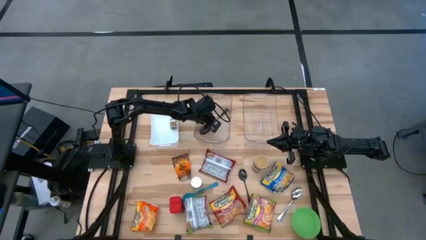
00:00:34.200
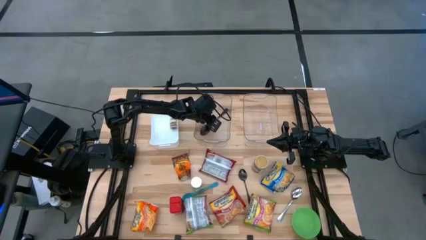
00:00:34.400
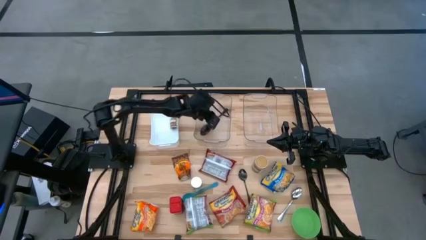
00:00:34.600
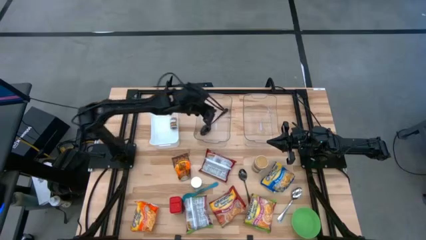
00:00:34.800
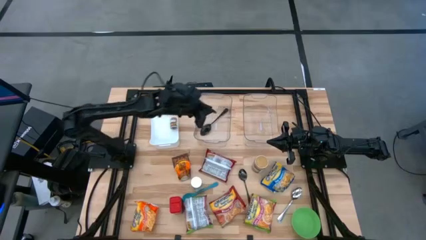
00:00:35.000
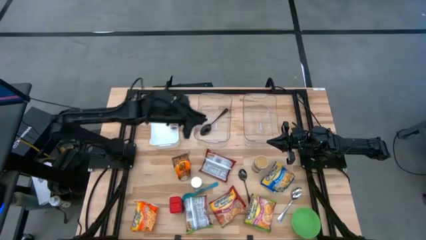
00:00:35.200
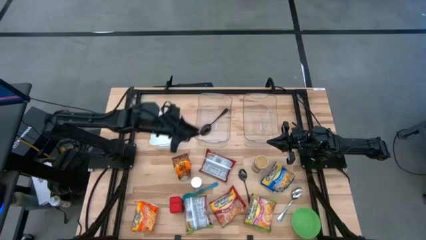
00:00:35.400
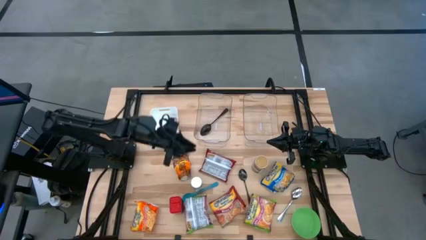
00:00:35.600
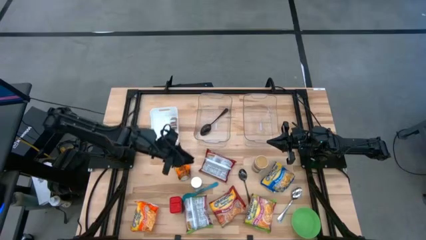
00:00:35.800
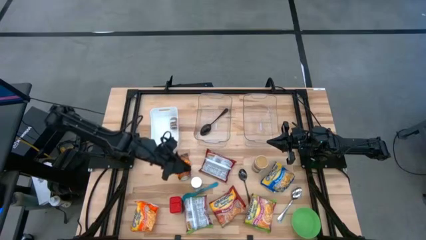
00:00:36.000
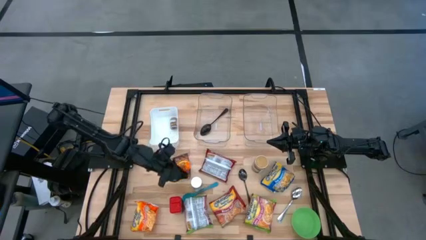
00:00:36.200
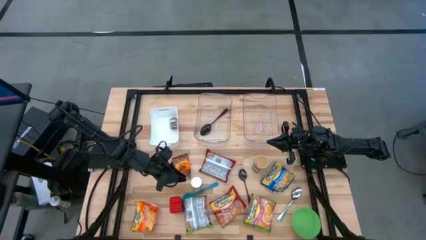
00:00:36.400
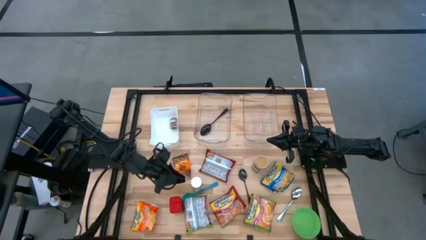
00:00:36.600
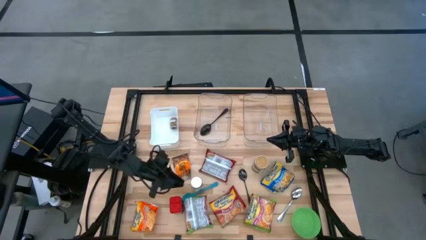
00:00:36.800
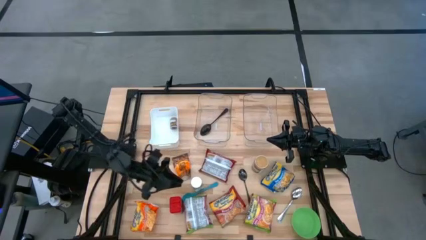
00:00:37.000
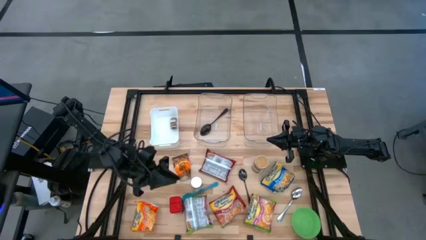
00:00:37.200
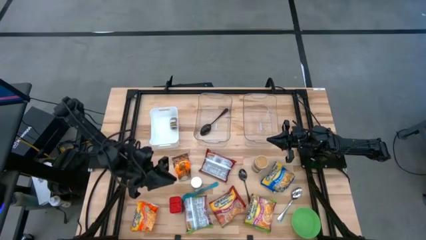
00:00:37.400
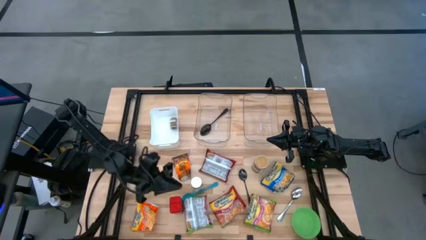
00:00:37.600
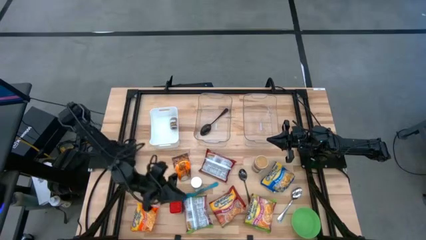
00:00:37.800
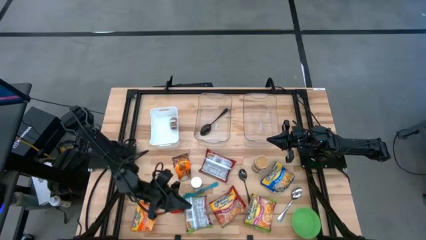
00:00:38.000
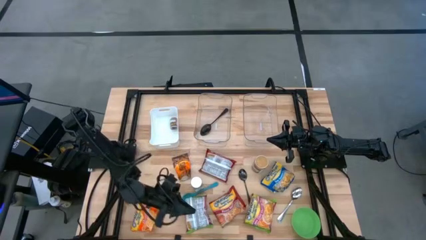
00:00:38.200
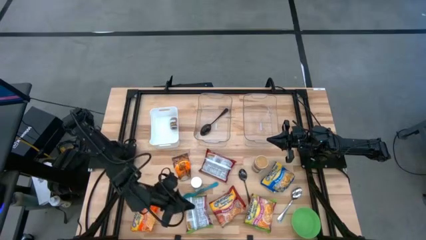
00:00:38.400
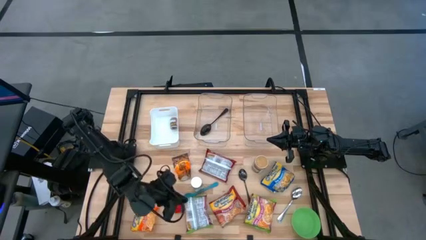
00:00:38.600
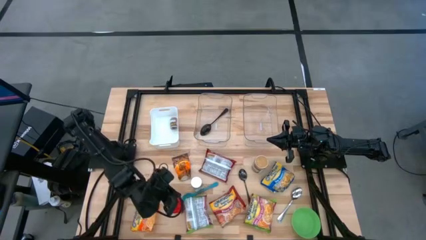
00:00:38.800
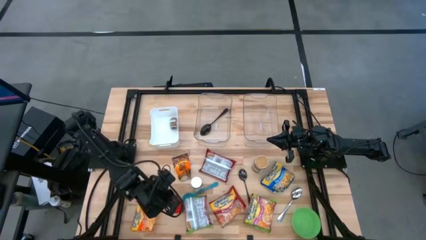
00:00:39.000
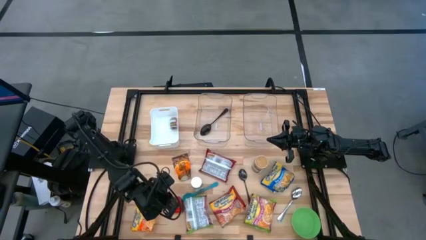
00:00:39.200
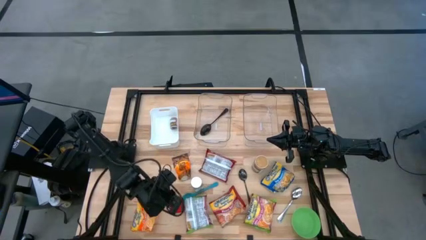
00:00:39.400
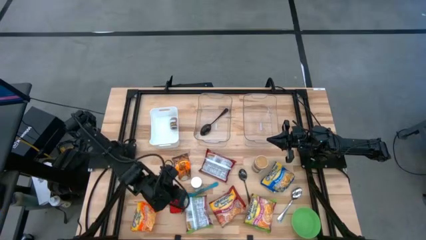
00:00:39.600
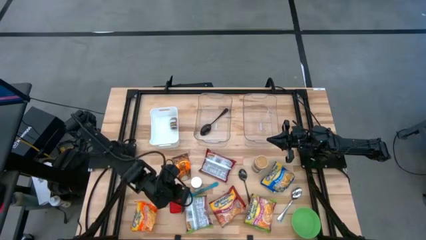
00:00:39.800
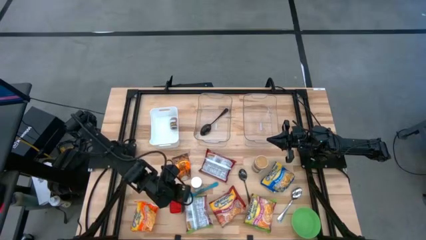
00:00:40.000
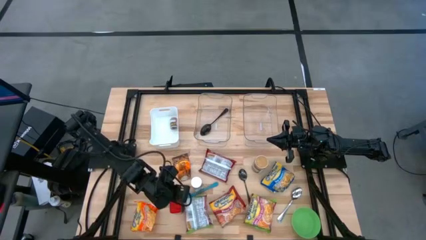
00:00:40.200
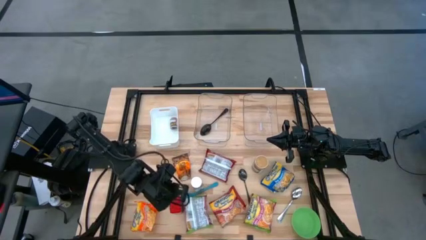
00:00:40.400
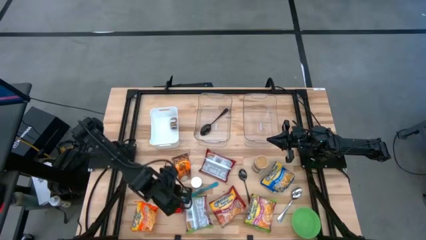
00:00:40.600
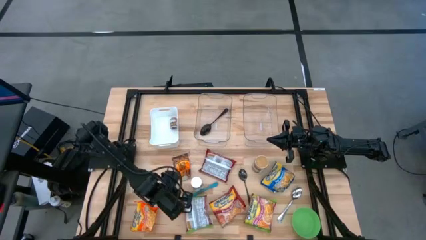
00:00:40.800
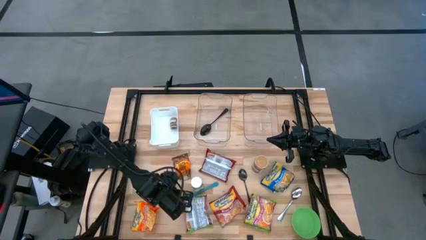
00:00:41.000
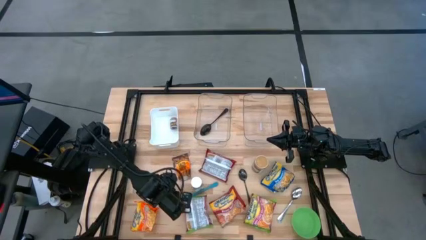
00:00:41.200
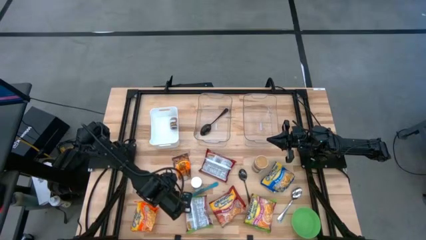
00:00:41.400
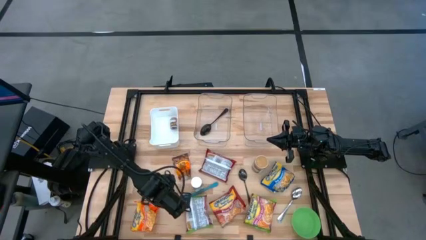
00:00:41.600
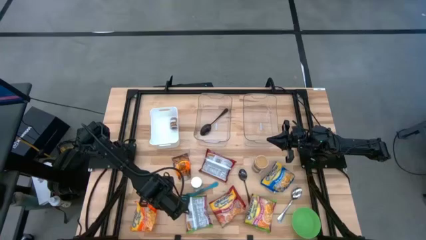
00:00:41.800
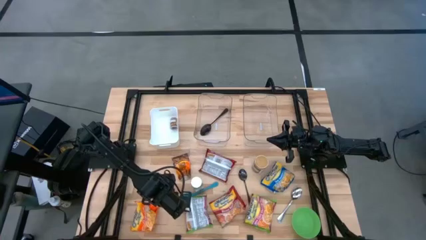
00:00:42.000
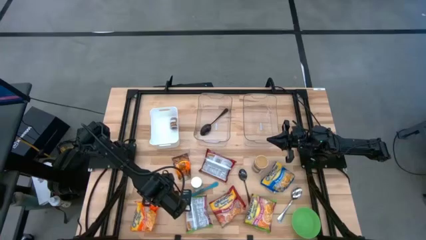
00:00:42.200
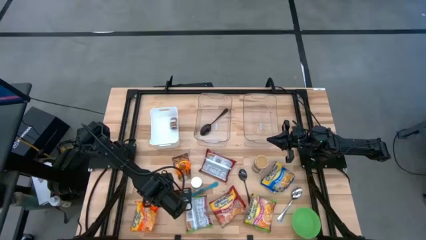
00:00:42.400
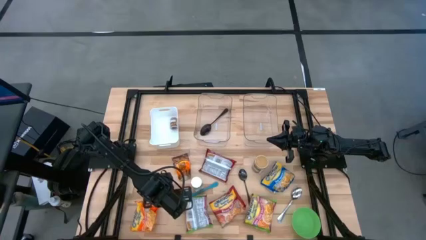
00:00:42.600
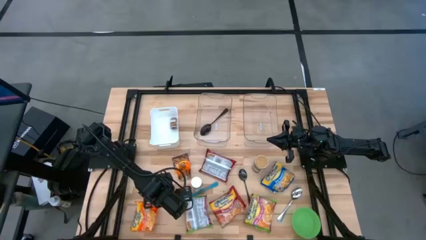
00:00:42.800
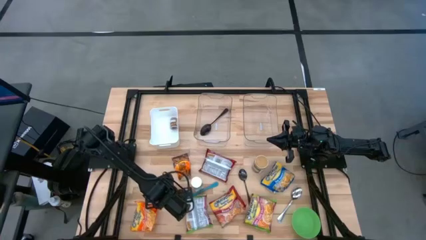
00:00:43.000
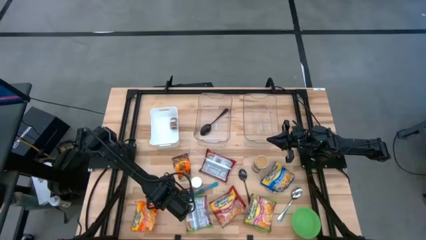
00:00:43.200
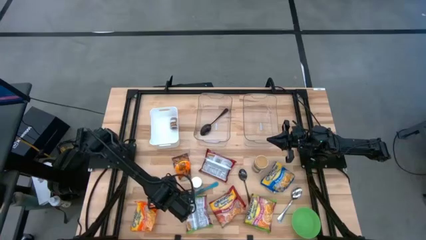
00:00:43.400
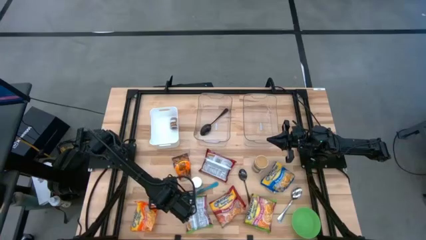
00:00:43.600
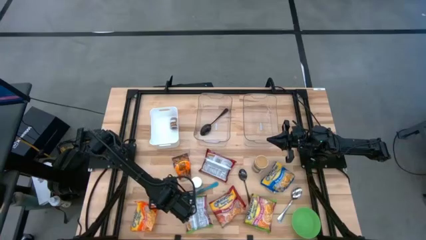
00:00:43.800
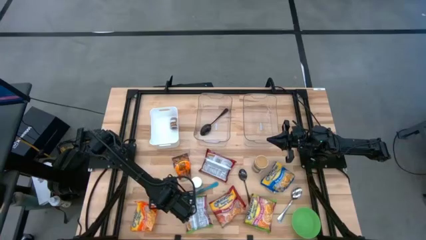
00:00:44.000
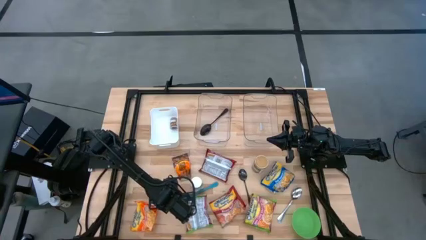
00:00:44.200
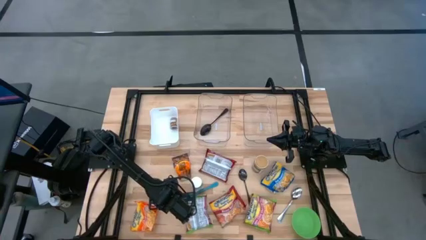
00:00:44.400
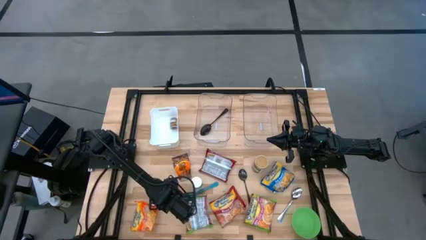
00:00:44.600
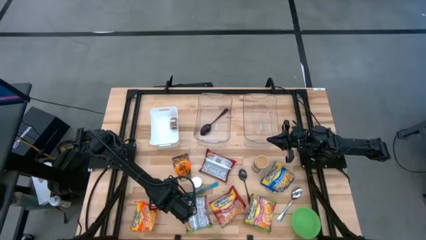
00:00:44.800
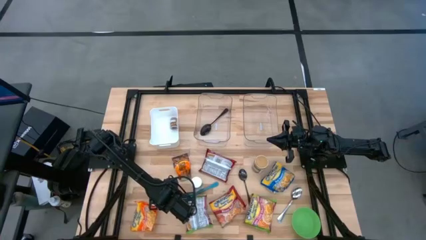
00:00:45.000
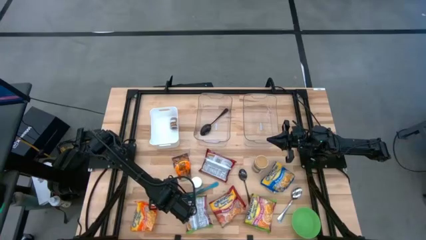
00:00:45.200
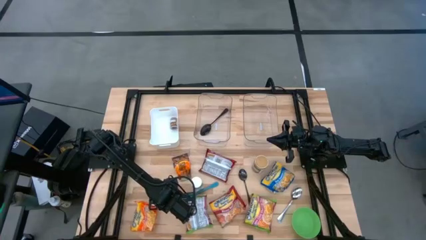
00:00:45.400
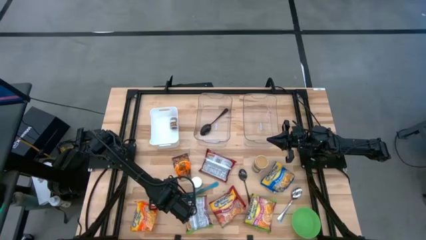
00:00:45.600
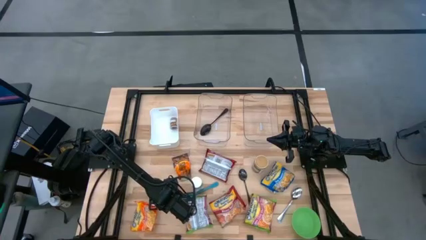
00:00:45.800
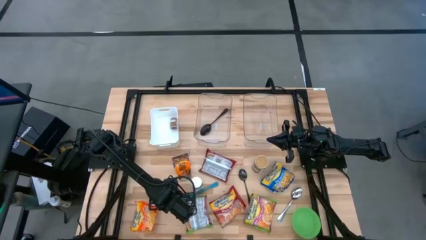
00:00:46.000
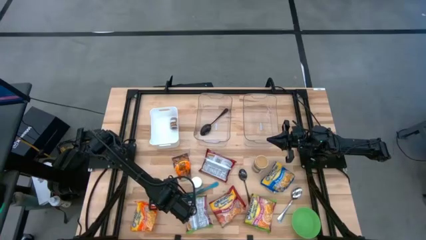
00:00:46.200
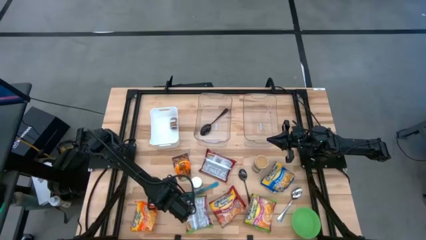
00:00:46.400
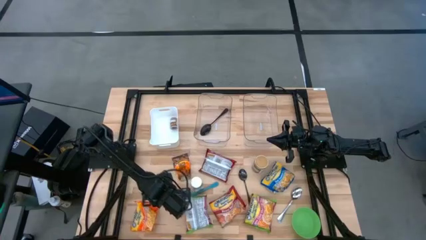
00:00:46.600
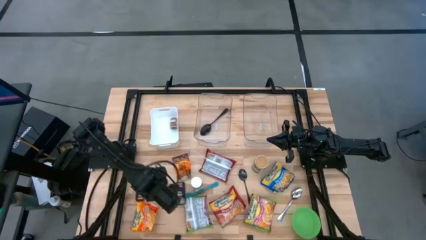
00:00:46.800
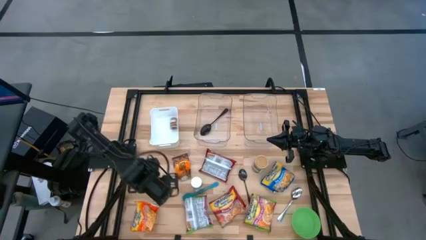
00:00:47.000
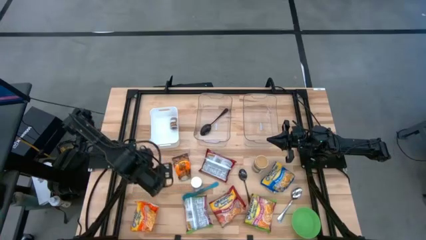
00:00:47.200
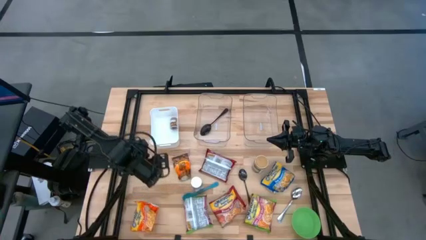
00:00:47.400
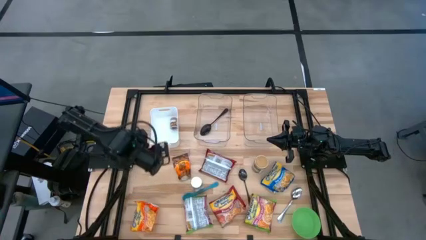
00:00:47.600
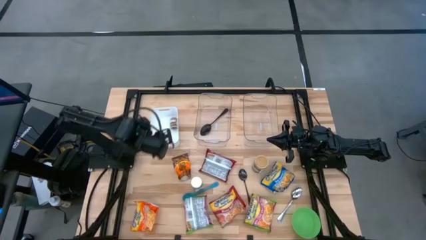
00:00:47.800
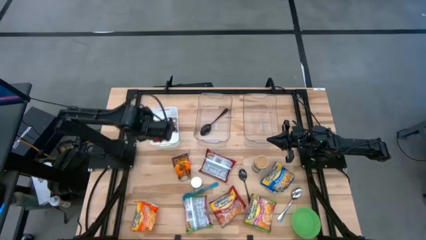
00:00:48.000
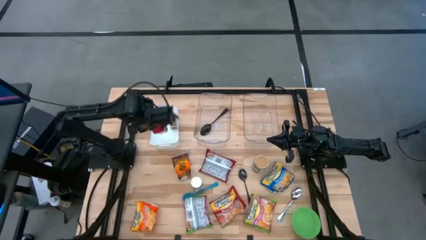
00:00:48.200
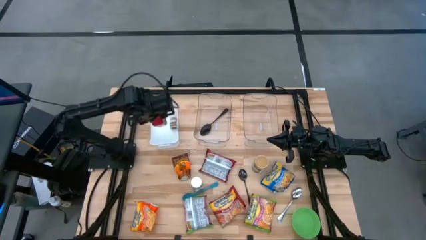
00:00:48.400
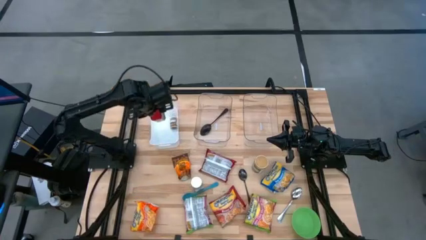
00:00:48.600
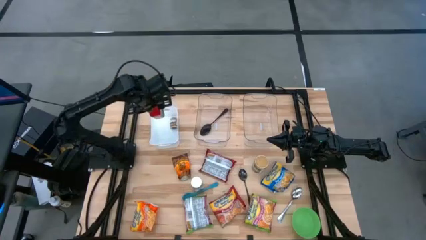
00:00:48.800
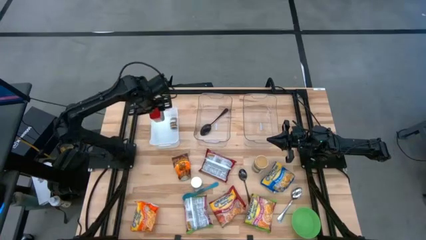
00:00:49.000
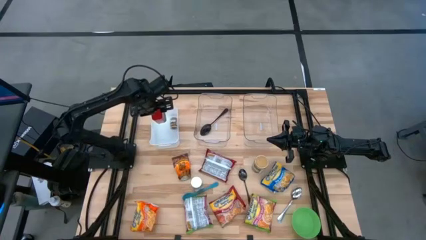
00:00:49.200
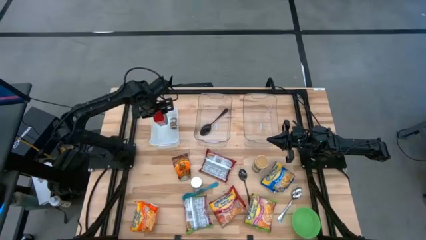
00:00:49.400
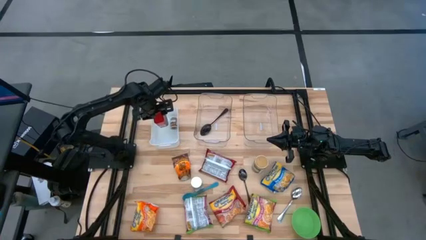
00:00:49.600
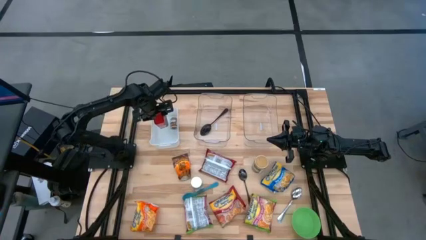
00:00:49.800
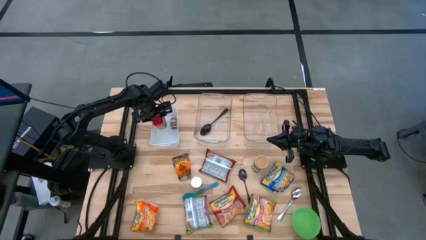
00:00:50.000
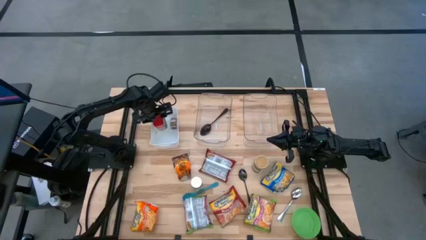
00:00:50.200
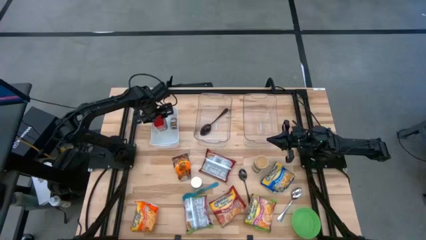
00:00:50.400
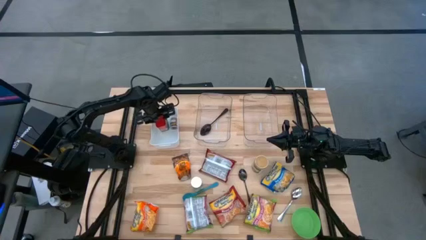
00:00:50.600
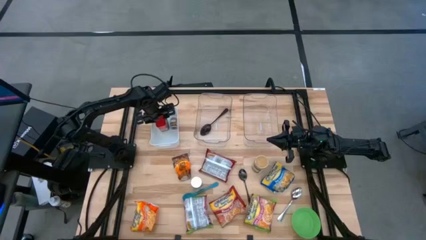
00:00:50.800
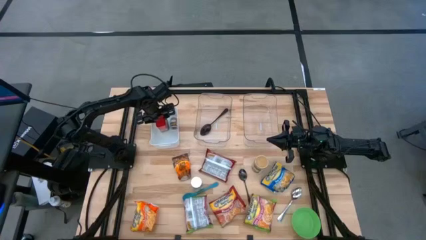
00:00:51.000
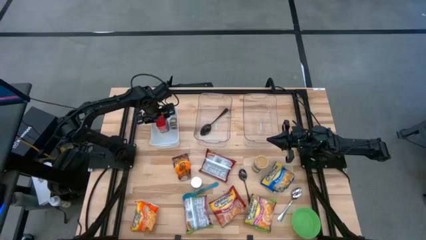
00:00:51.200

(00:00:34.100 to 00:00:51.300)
Task: Pick & Place Food Item
Put the red seasoning can into the white bin
